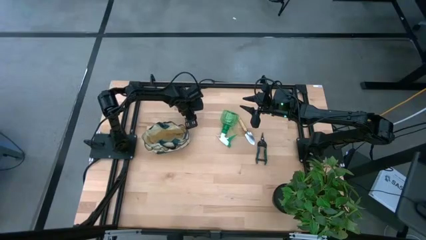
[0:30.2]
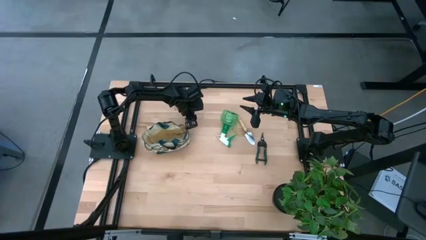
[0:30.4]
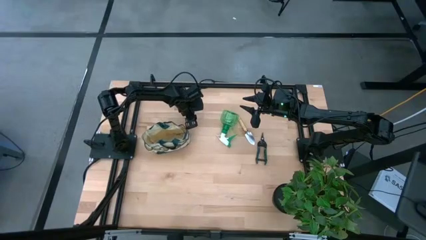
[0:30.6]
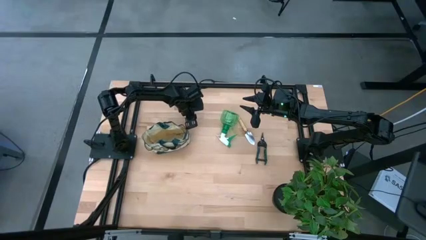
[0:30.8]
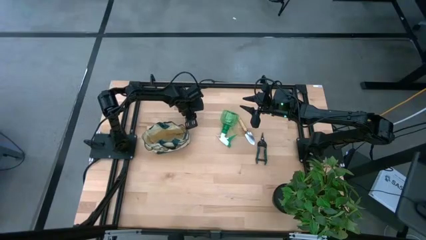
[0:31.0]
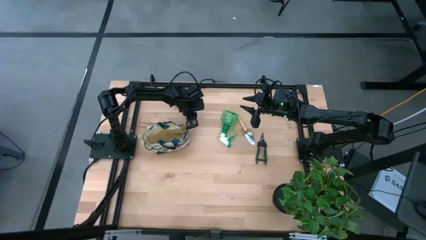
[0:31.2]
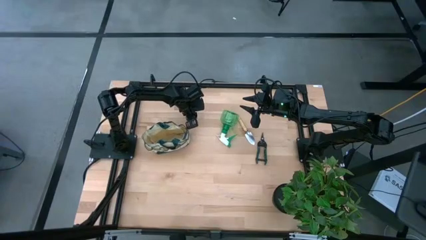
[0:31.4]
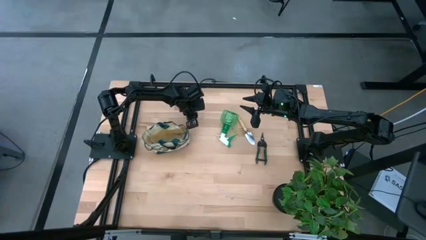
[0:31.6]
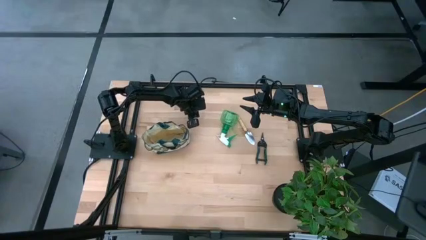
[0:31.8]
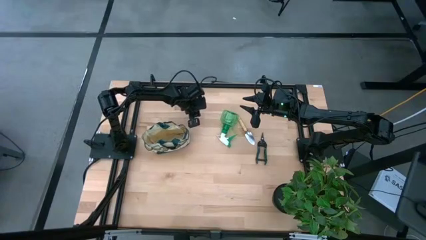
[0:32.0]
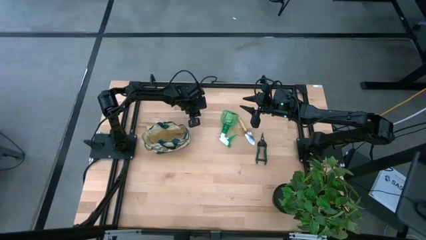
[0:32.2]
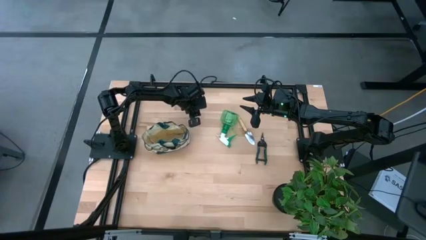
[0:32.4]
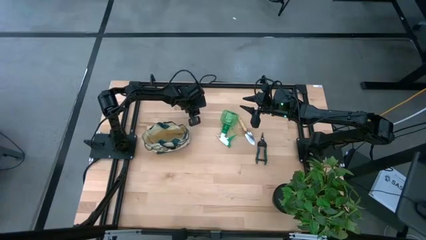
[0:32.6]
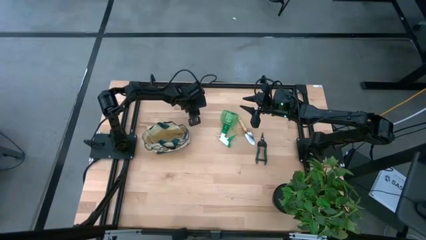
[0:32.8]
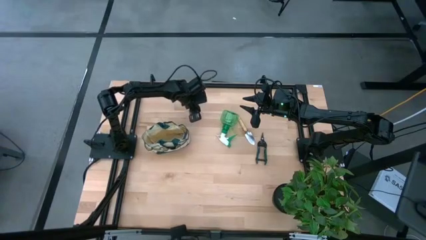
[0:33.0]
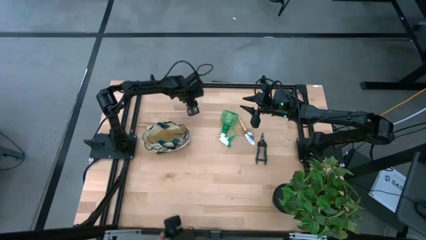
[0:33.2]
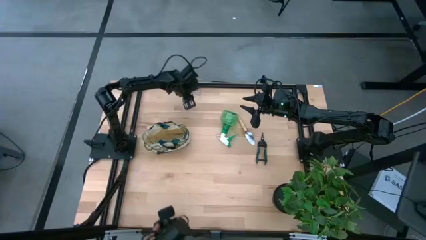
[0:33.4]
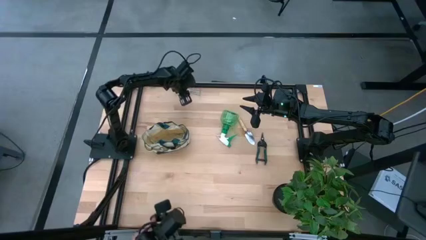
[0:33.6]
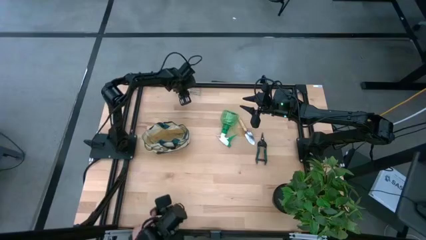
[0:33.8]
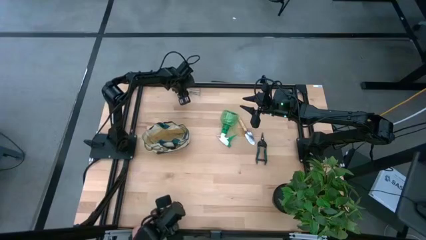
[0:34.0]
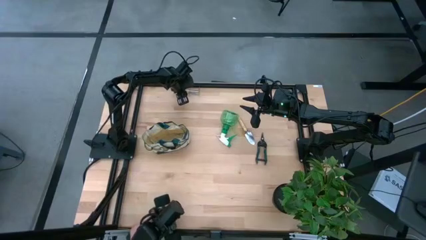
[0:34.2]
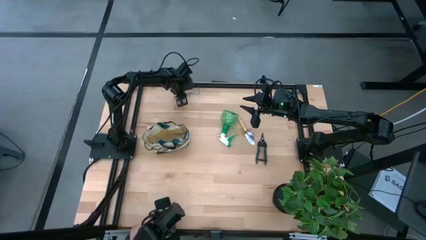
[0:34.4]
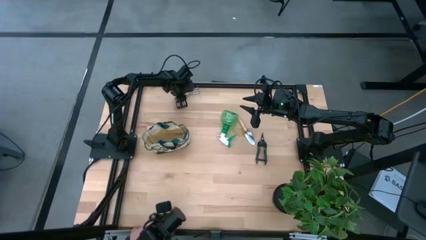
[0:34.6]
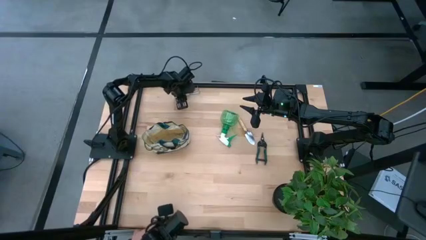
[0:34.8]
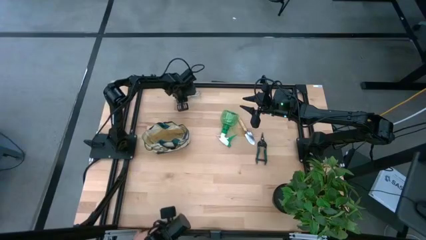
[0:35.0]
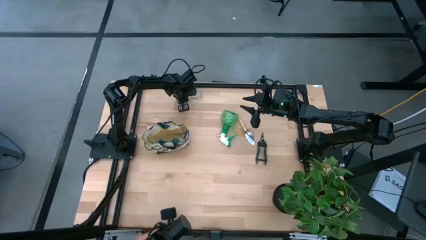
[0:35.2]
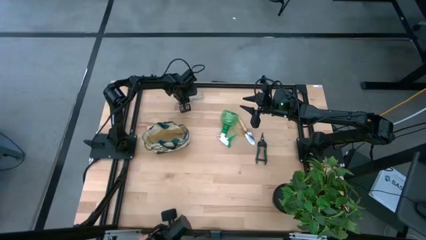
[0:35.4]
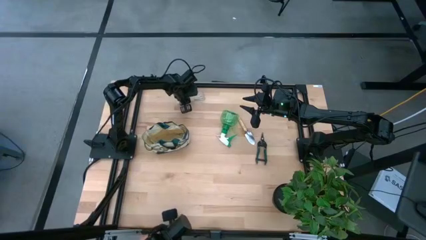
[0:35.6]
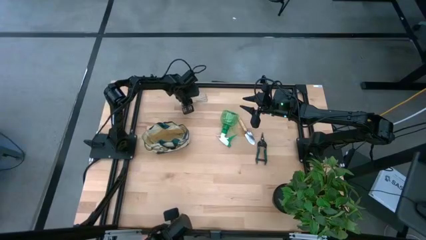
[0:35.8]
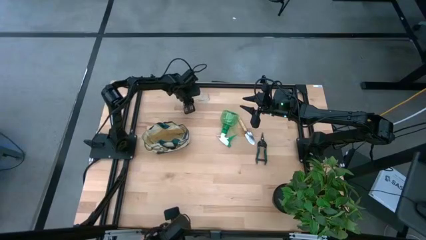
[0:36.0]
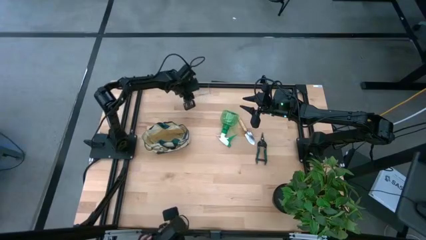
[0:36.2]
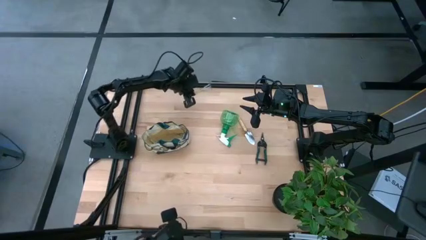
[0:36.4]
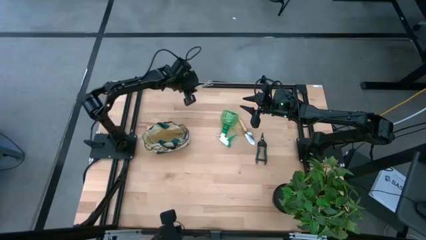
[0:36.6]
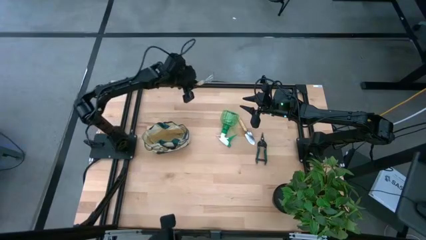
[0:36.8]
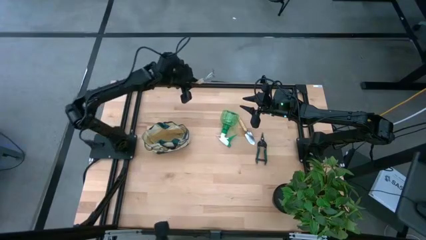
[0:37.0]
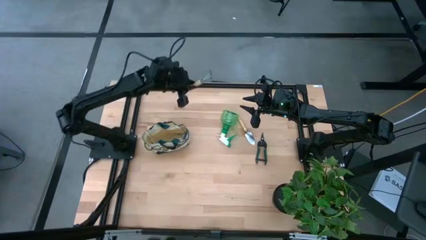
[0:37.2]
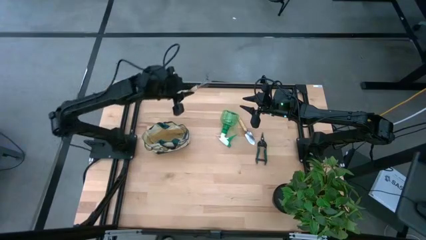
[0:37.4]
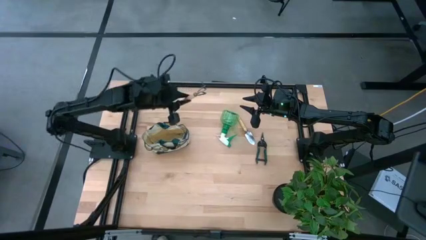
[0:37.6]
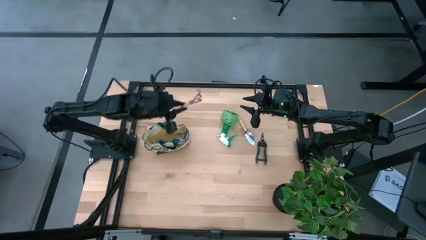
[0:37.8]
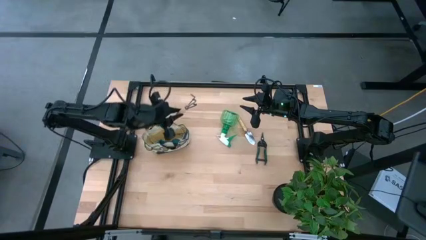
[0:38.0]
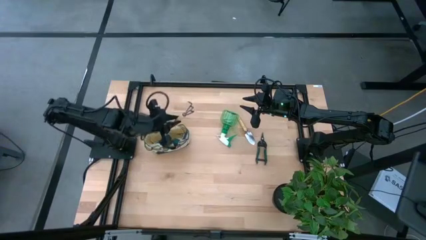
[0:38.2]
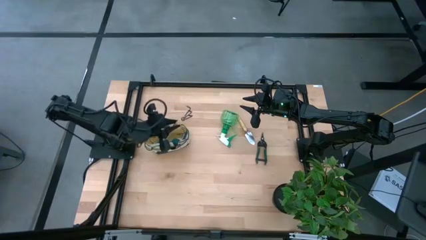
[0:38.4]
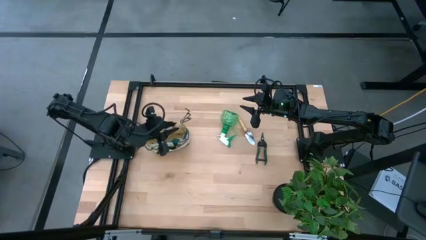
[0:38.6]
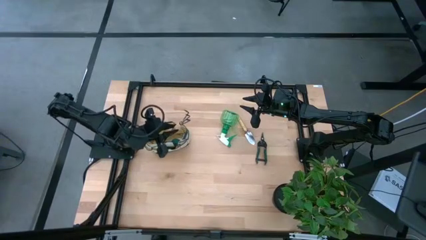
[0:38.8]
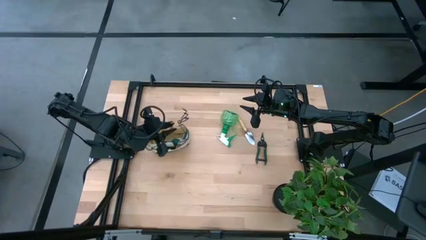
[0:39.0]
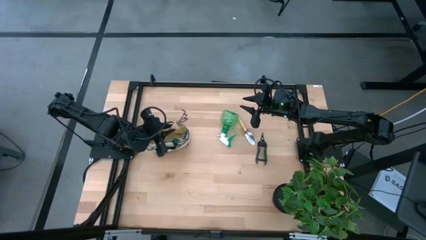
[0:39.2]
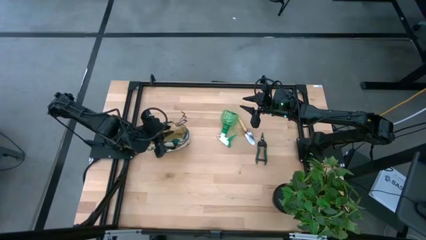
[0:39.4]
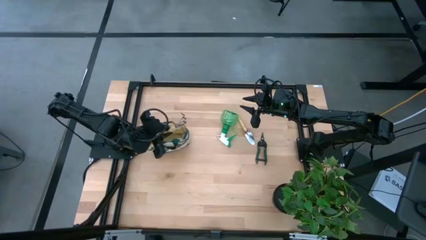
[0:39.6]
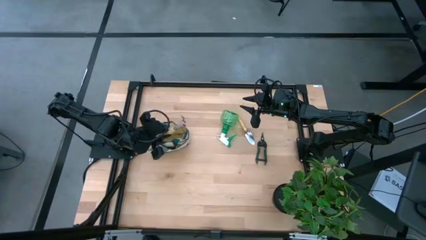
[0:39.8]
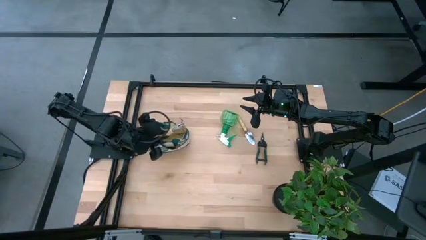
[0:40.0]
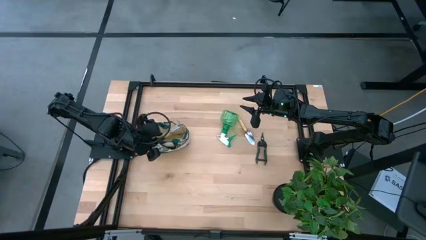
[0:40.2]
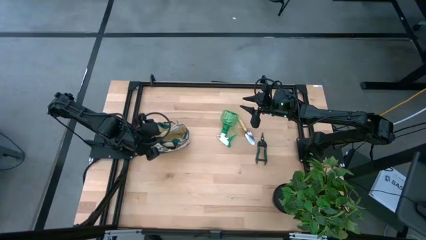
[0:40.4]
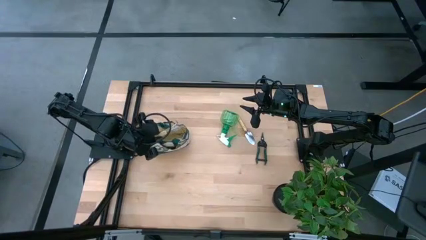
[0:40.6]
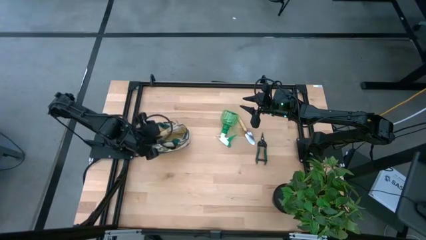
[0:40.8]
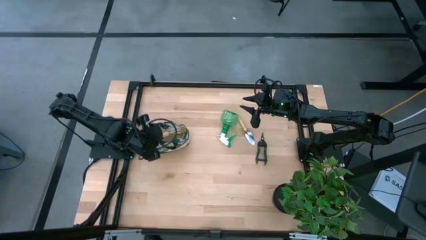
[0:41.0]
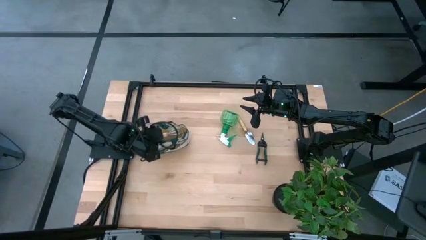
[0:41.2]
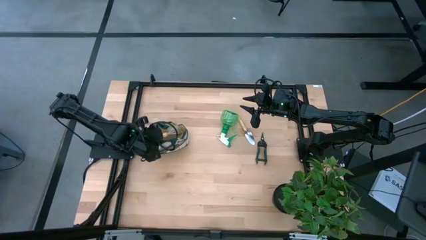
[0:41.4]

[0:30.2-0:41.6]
Task: Pick & Place Garden tools in Gardening bag
Put the brown hand rake into the gardening bag

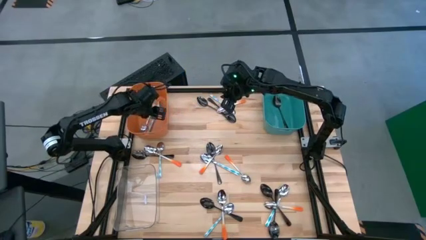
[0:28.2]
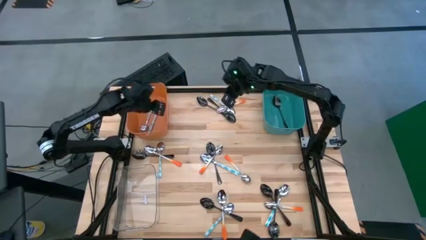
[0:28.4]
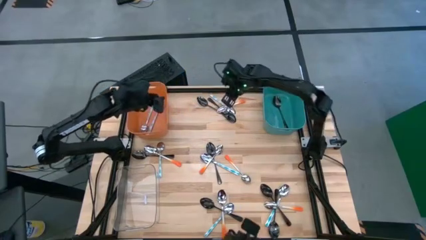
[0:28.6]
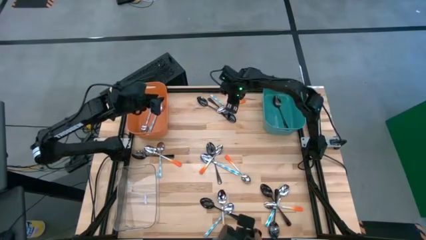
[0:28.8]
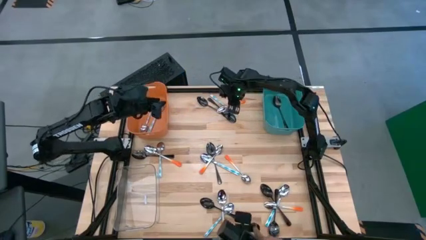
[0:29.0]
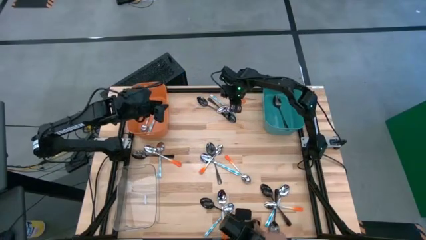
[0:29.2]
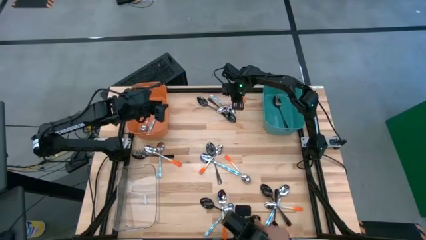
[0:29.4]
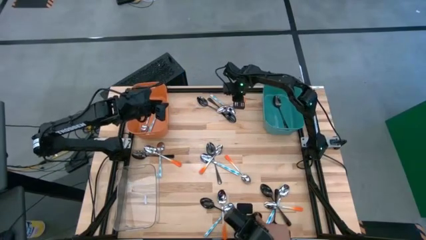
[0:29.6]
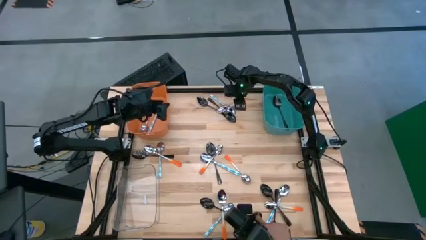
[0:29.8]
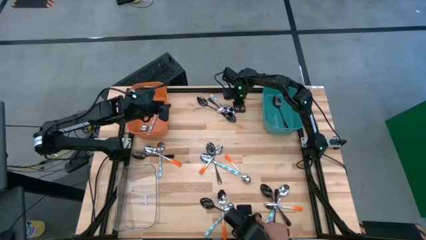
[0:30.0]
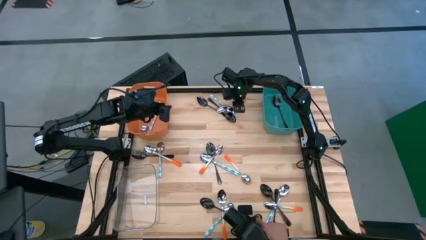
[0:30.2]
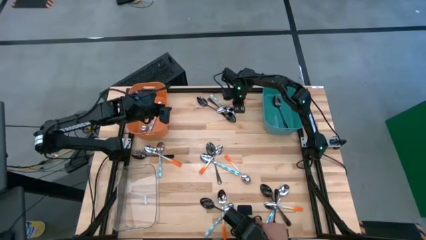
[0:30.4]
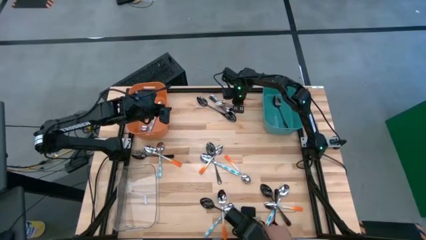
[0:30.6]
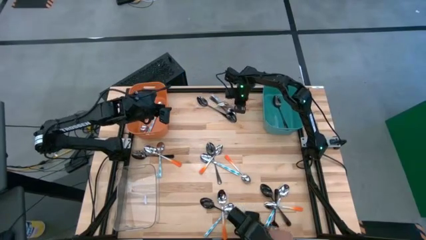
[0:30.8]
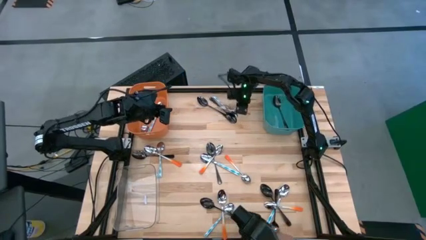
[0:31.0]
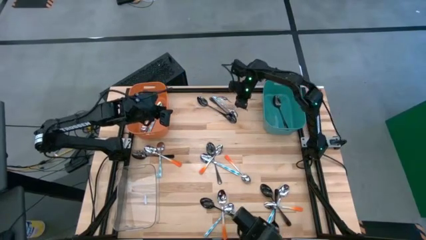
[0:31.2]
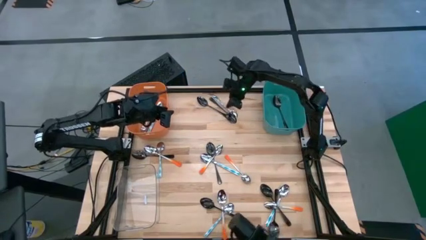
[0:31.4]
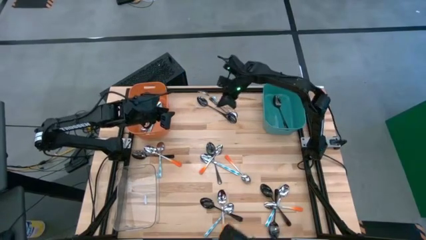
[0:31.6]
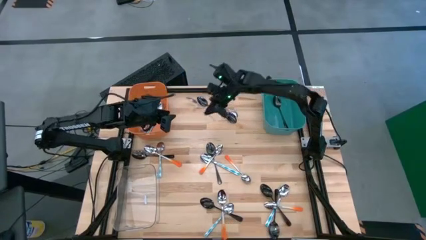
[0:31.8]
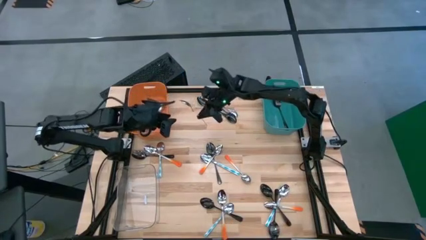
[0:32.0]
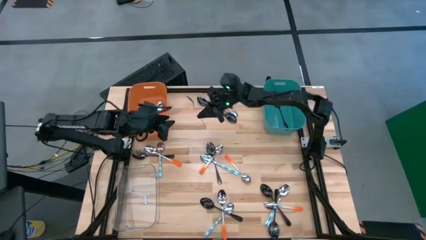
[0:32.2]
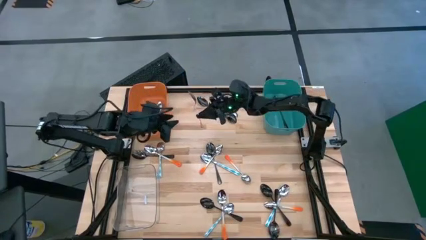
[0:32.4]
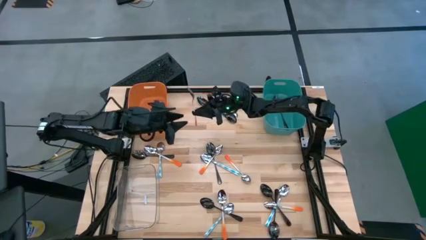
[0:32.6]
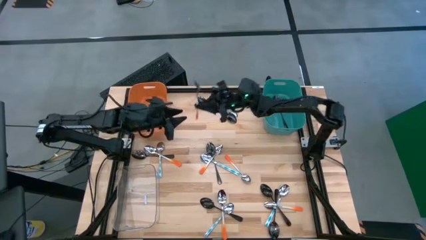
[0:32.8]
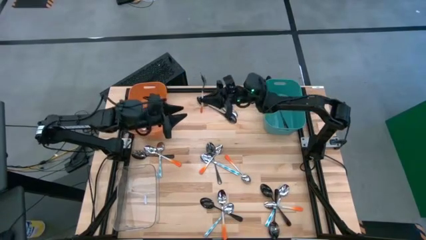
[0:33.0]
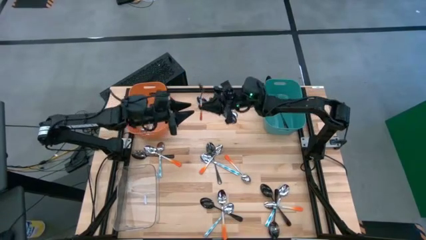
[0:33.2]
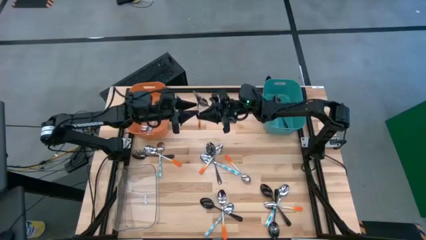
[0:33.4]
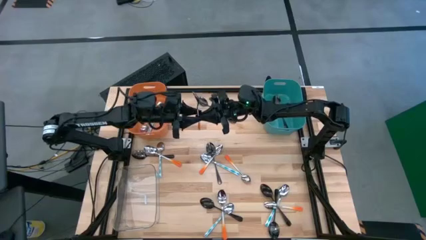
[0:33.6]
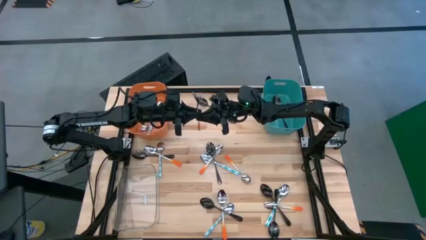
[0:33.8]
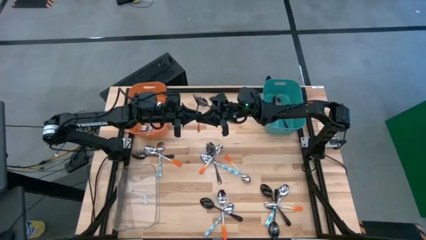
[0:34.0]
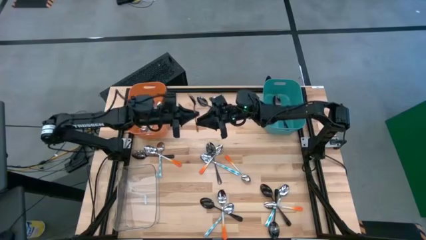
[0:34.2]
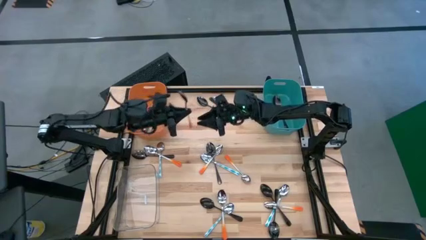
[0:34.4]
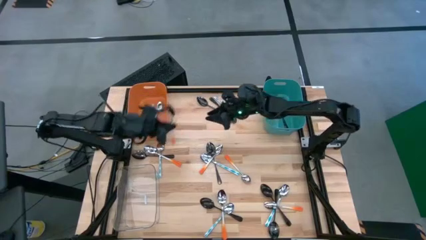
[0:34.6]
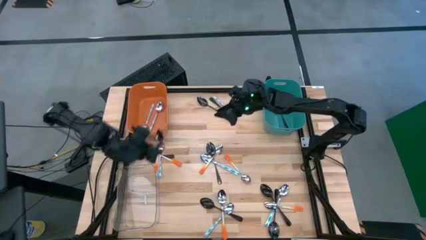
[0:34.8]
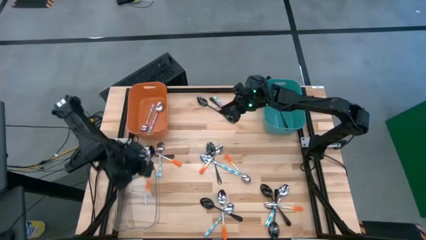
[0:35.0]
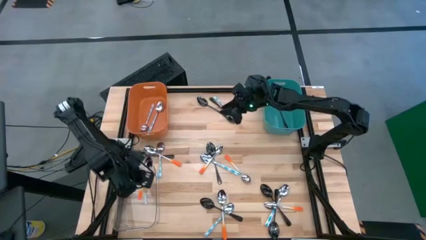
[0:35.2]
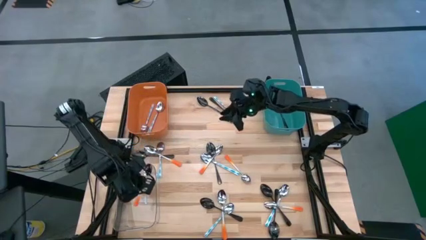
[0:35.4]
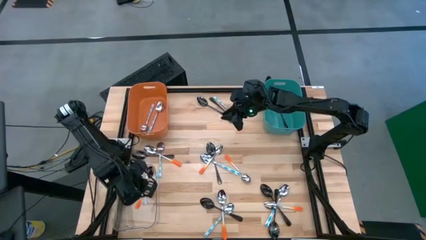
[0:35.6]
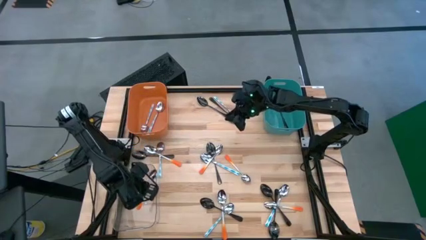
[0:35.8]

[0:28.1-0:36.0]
Task: Sort silverware by color (type)
Put the orange spoon into the transparent bin
